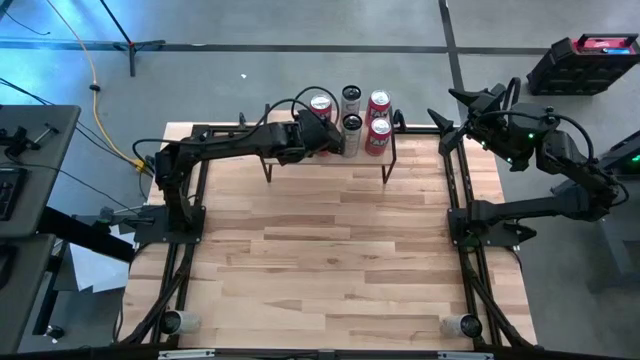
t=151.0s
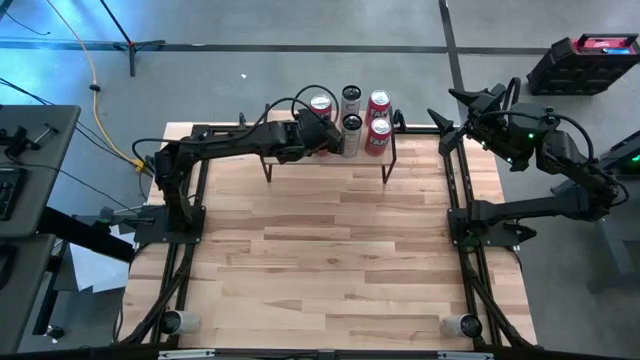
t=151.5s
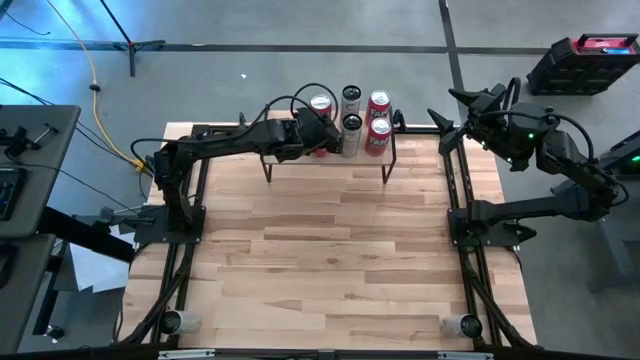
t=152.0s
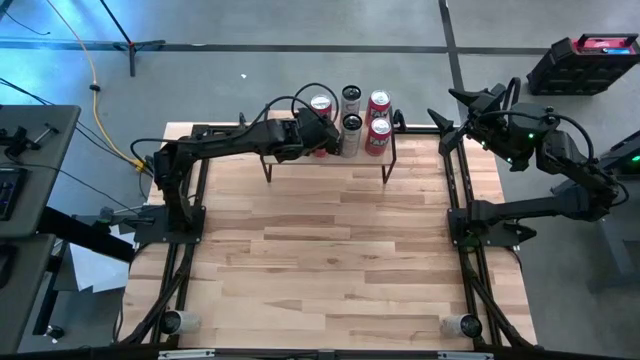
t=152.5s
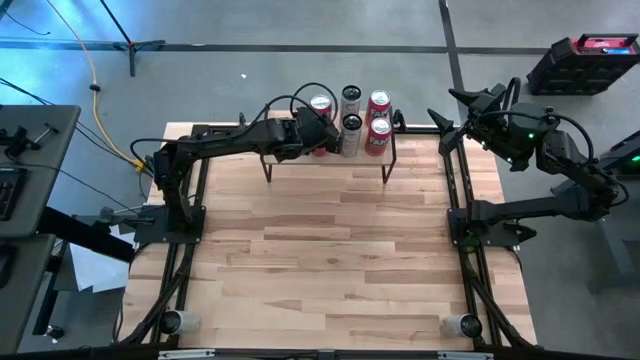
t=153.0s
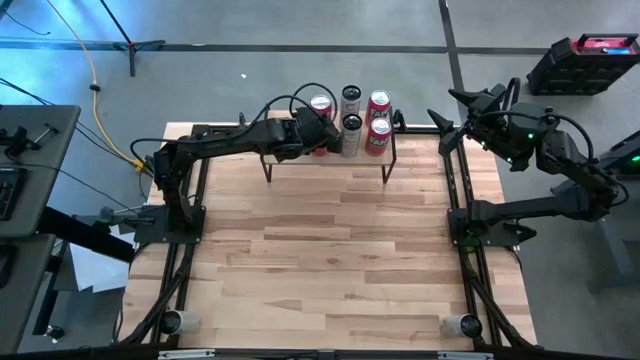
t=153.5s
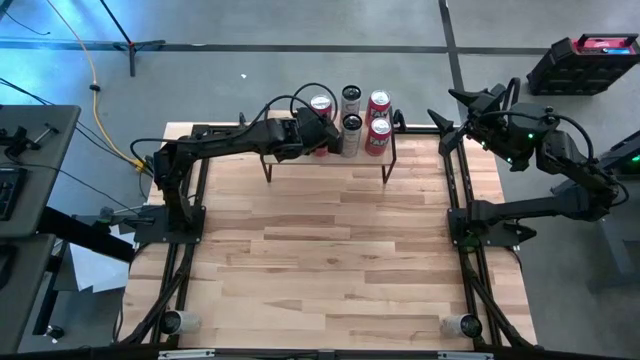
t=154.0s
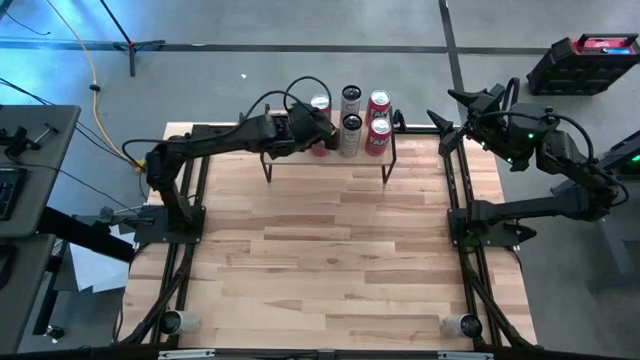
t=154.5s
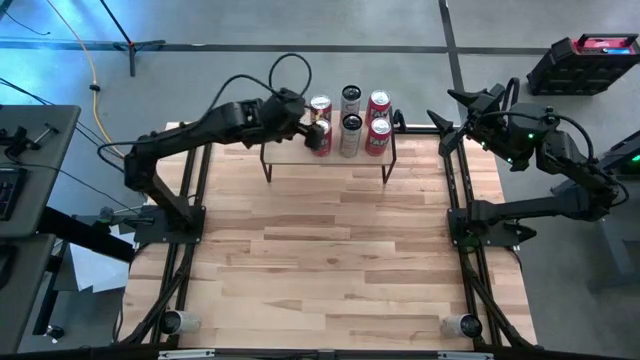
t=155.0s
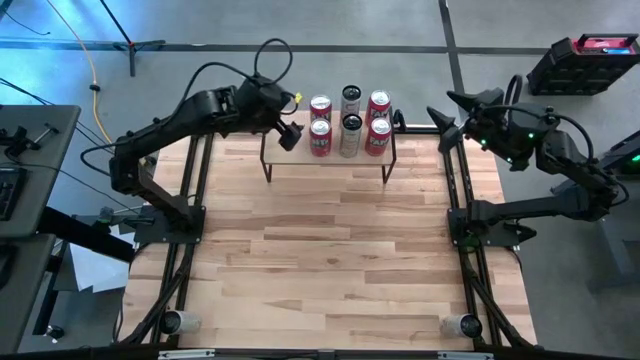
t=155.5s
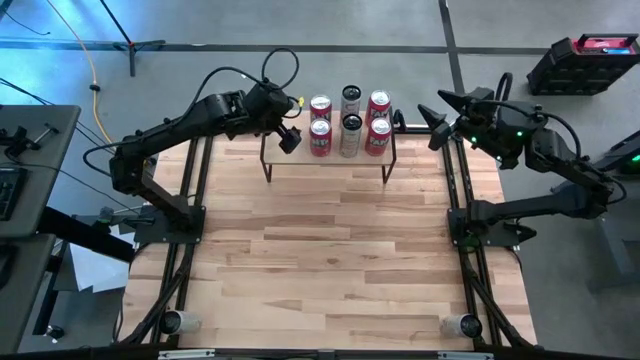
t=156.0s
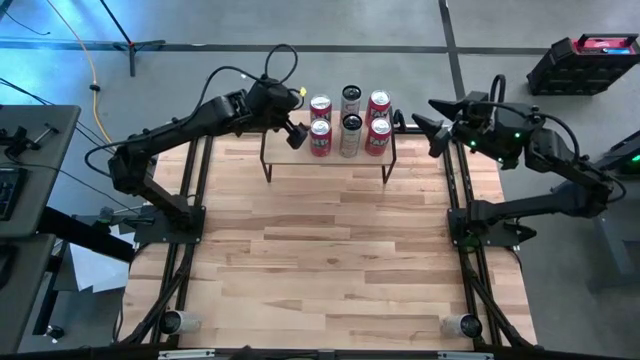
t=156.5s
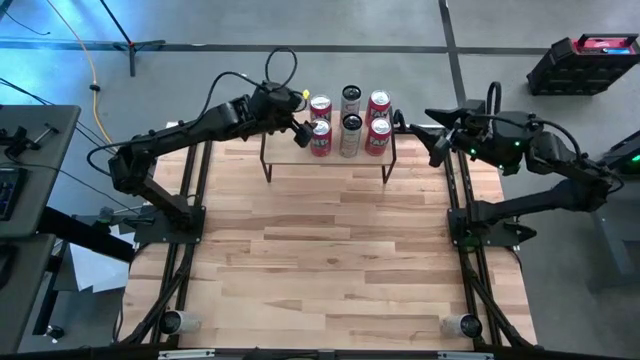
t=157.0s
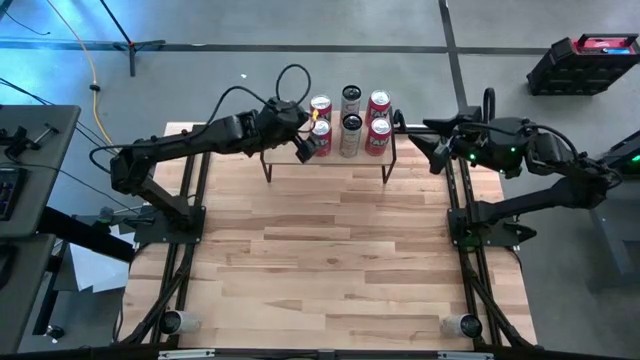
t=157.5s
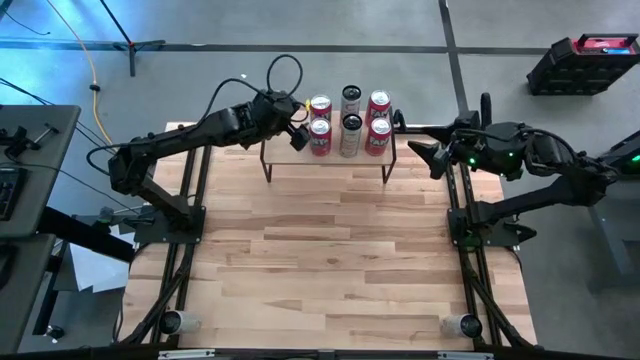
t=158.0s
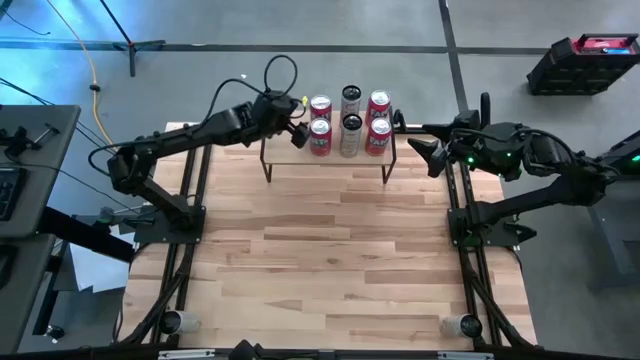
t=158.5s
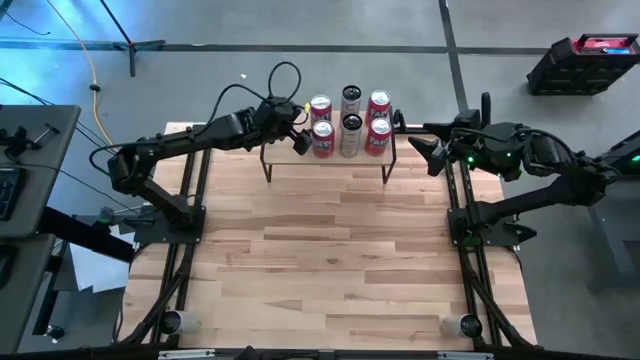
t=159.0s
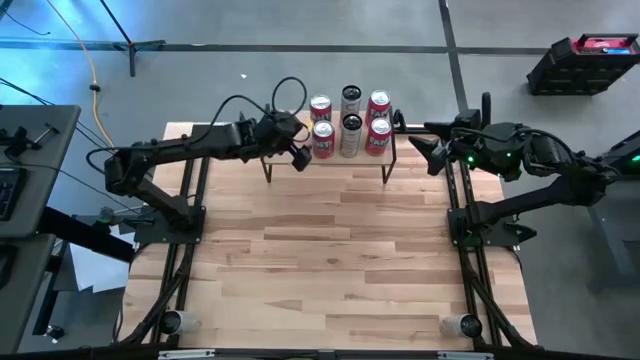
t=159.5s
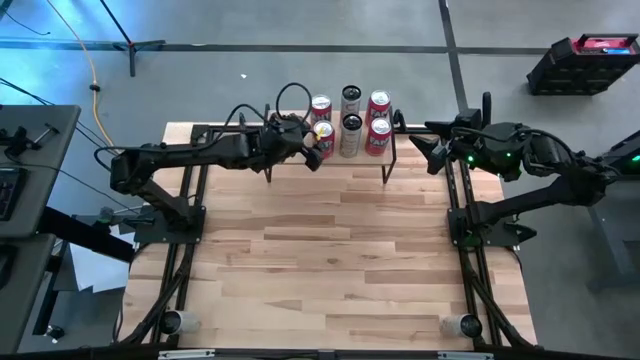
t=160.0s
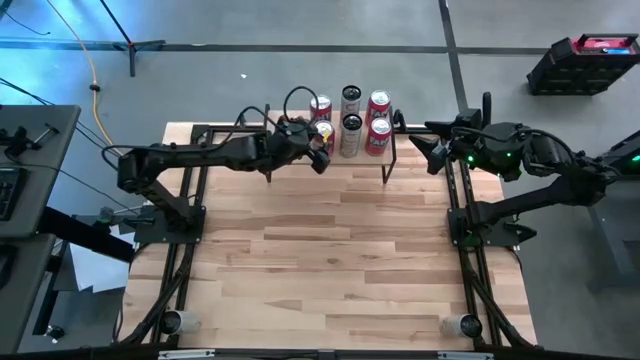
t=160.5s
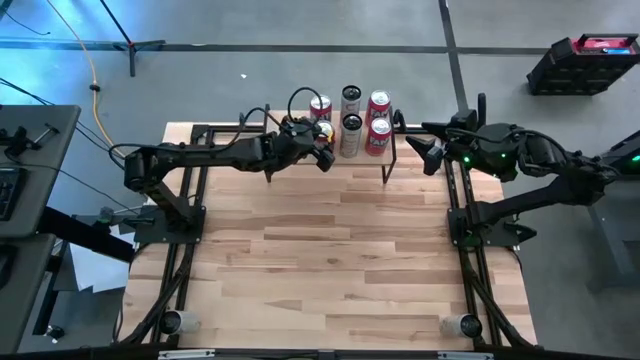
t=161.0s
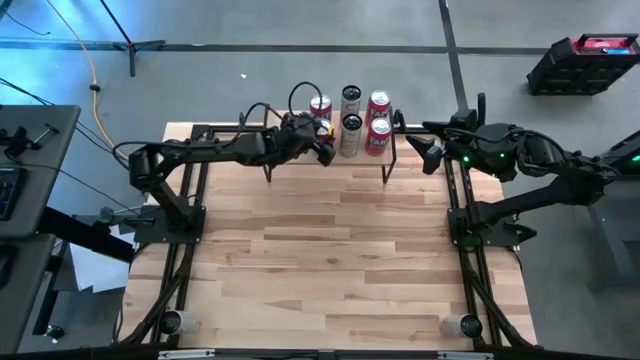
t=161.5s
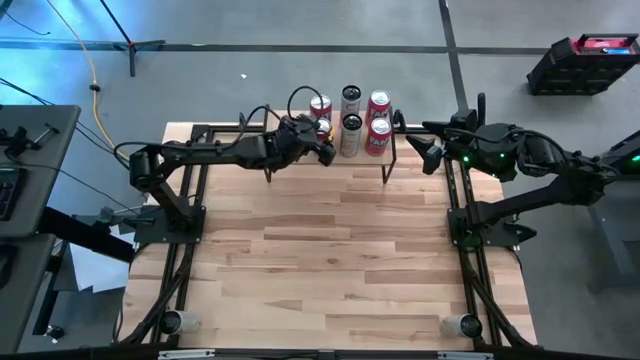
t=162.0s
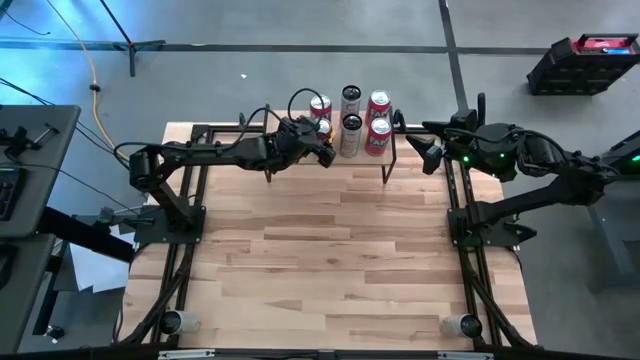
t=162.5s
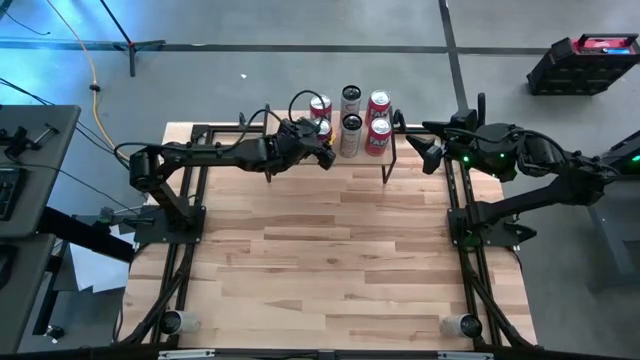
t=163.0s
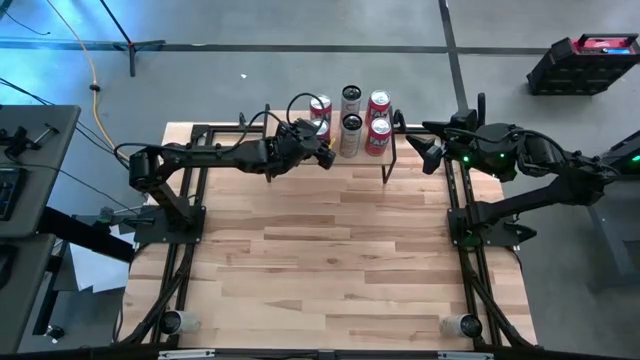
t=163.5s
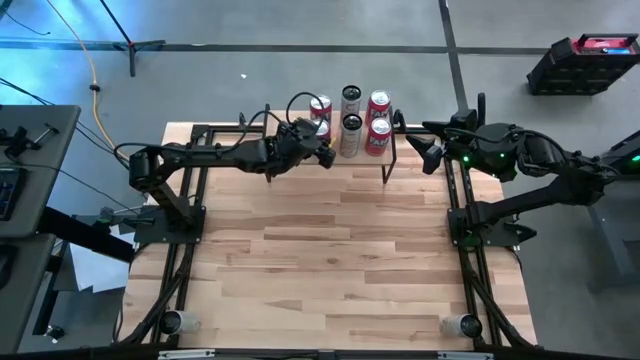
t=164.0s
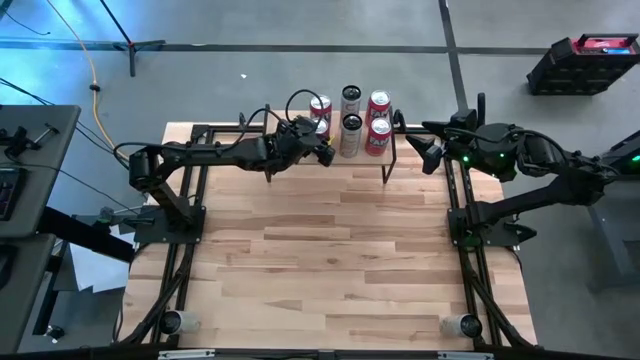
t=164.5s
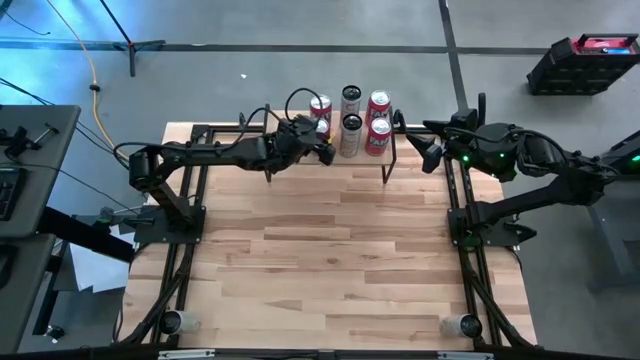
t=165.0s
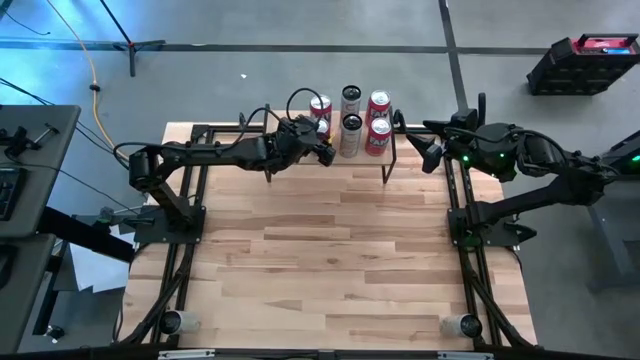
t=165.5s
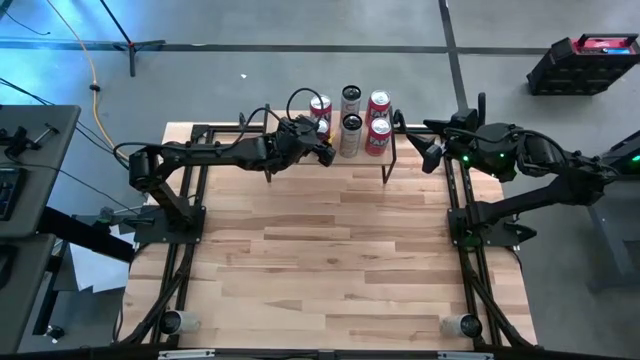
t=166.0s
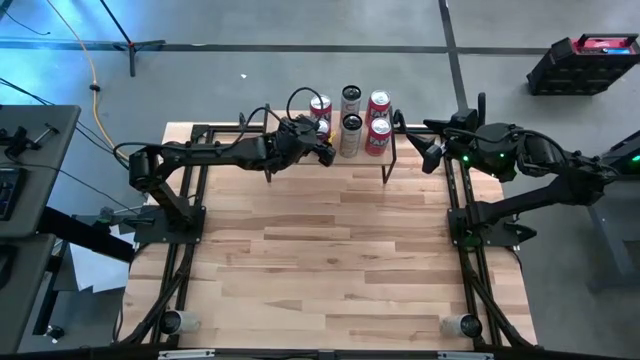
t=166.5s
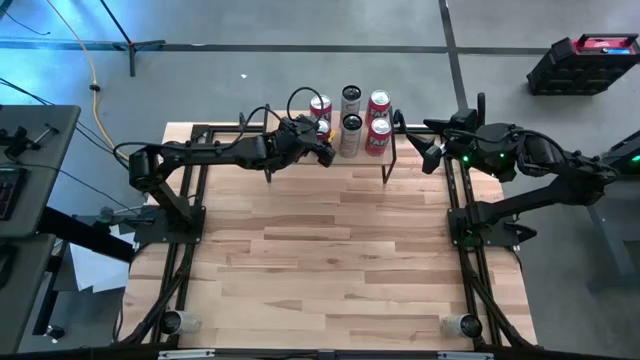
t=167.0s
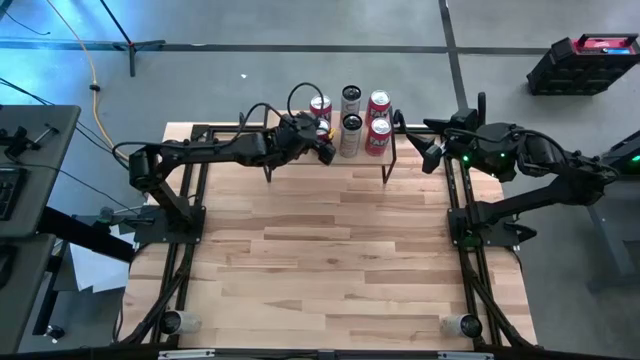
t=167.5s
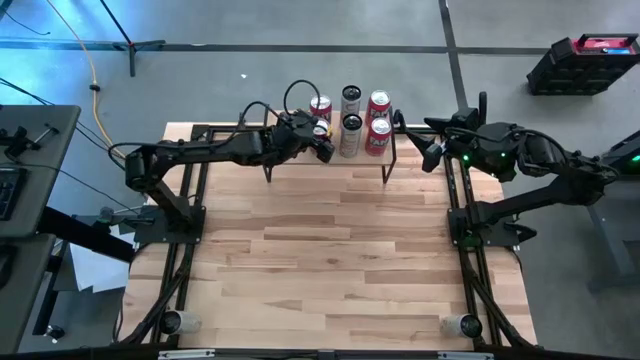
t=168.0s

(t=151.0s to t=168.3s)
Task: Place canned beverage on shelf
Put the red soda can aligned with the other red soda can on the shelf

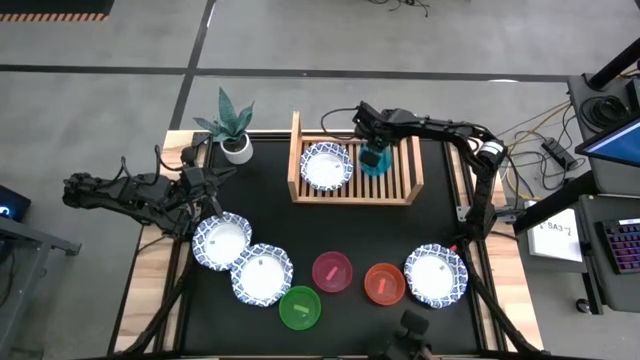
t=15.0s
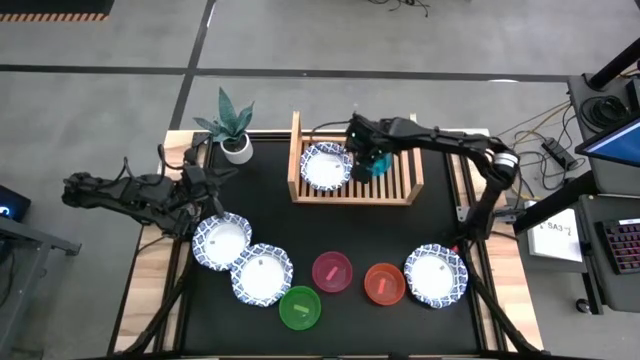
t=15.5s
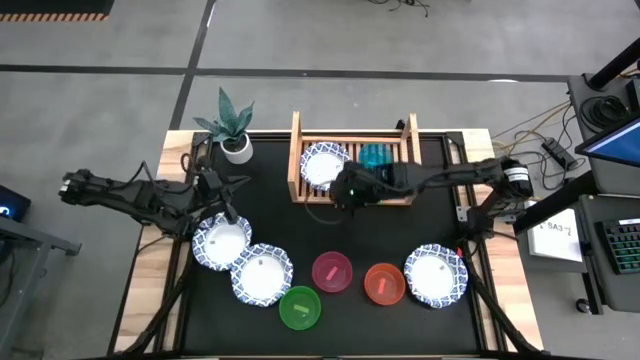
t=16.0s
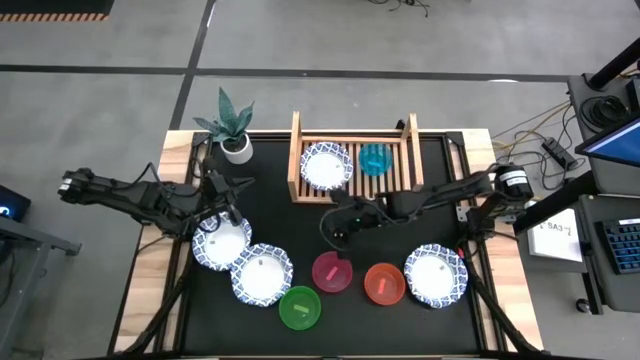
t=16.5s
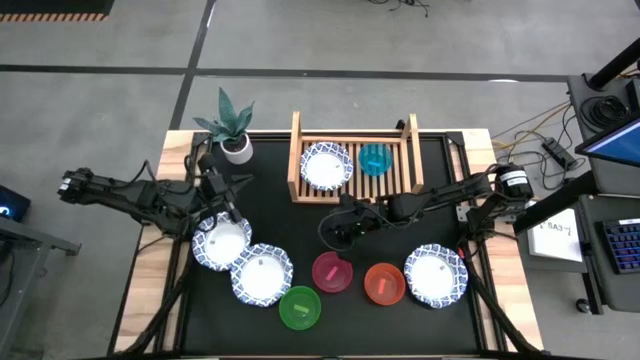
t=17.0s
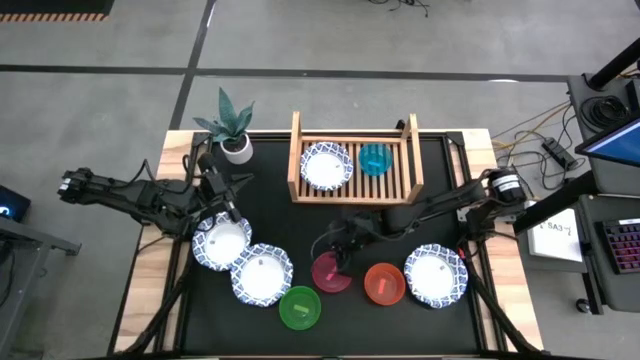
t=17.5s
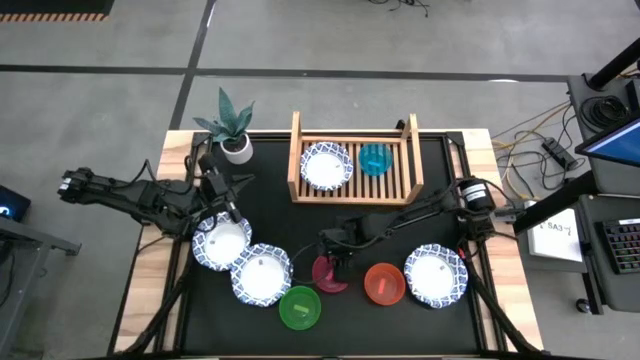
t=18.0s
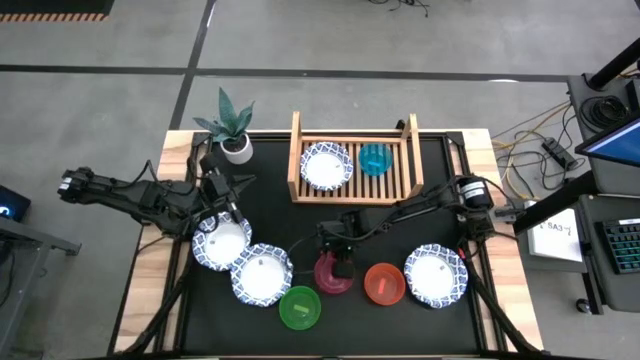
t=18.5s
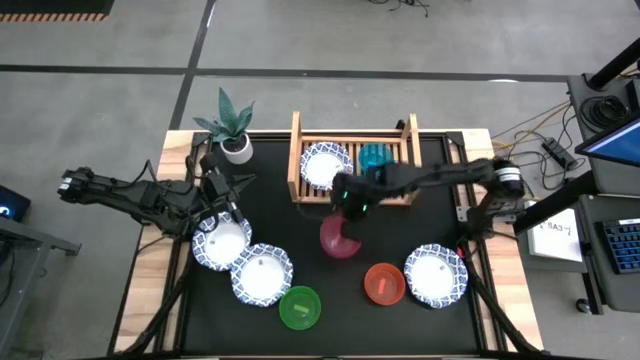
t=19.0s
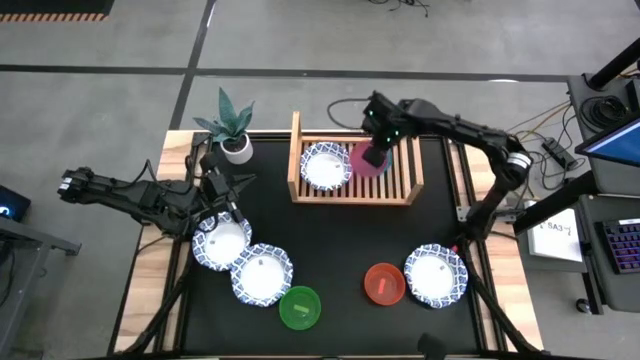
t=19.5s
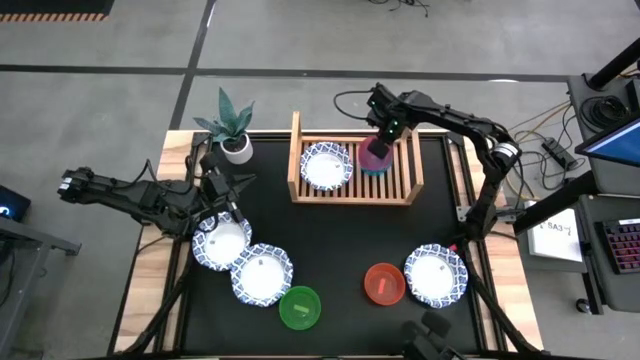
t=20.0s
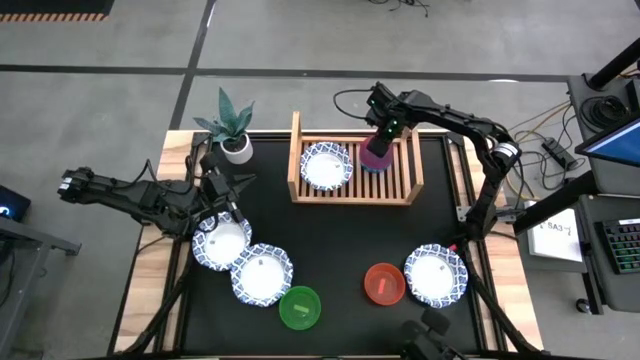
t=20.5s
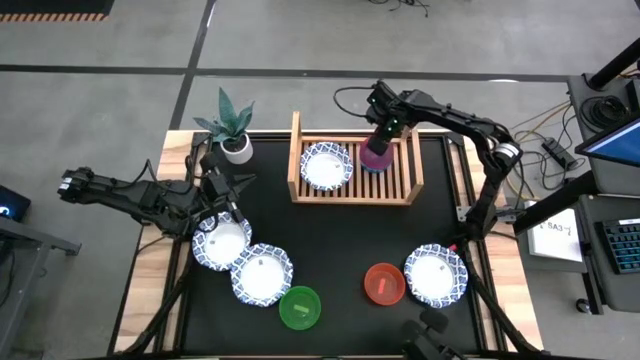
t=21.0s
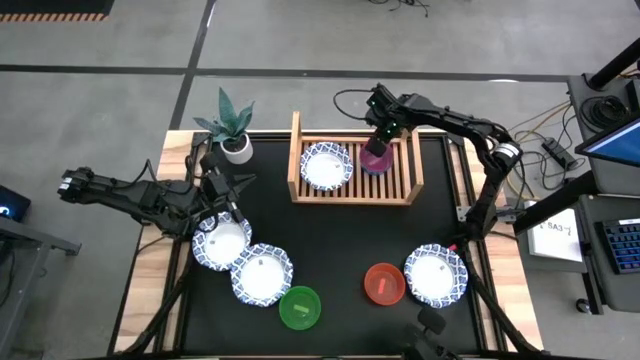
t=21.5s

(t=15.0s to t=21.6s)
Task: Place and stack bowls onto a shelf
Stack the pink bowl on top of the blue bowl on the shelf
